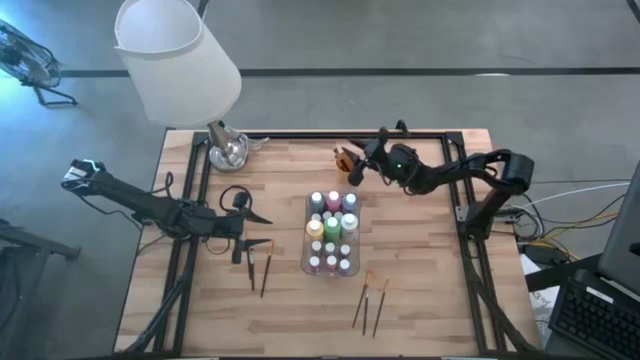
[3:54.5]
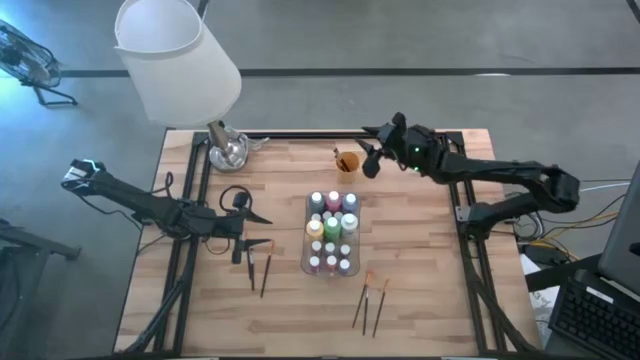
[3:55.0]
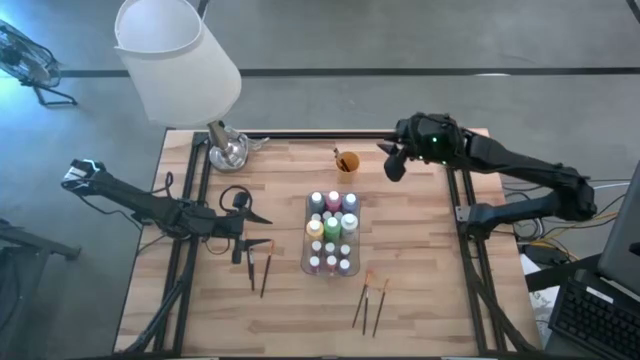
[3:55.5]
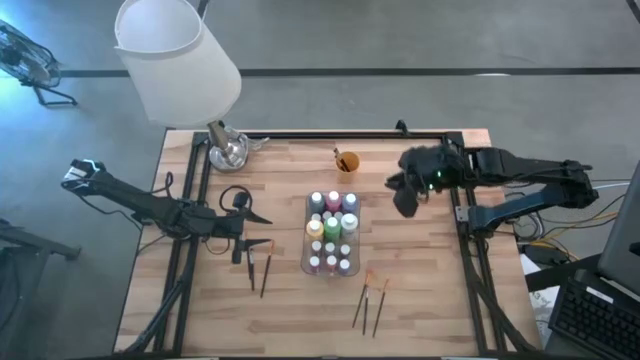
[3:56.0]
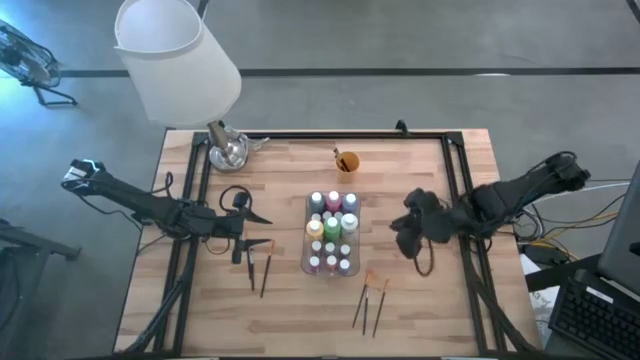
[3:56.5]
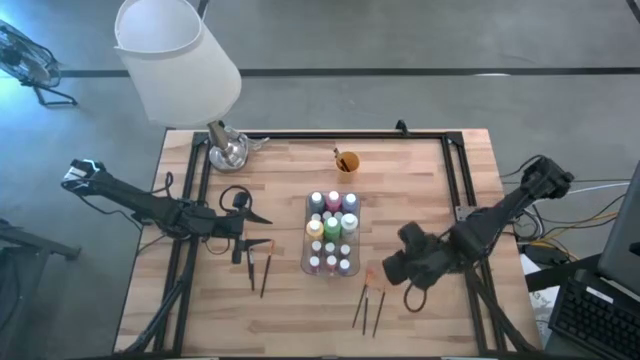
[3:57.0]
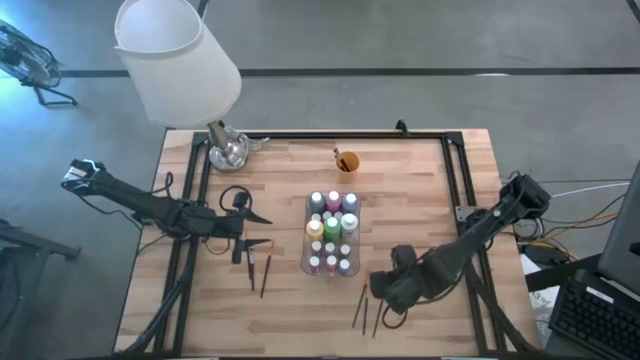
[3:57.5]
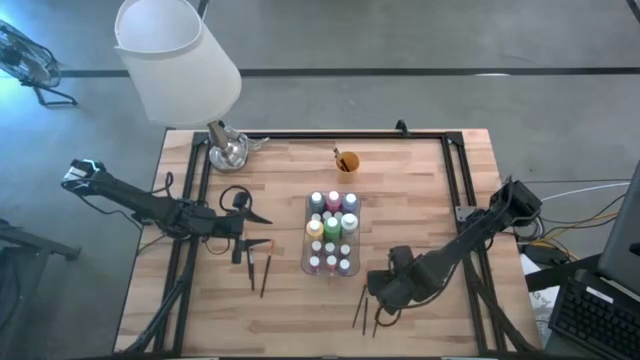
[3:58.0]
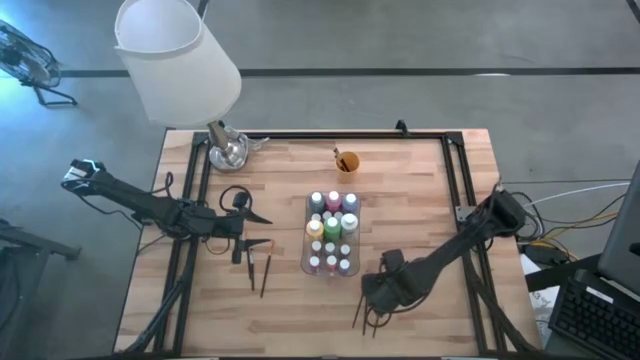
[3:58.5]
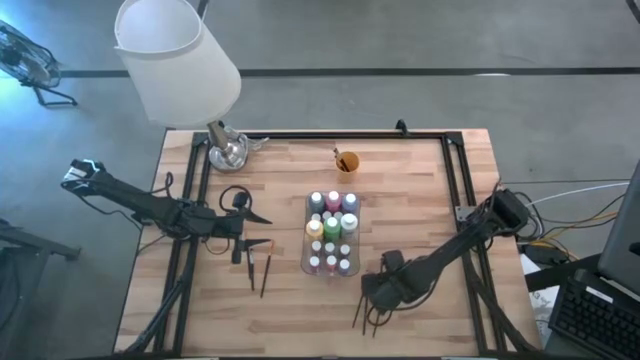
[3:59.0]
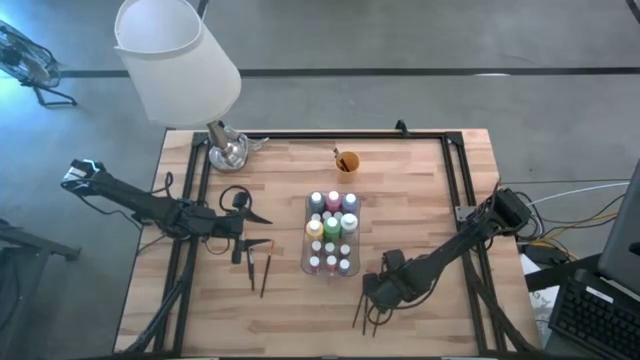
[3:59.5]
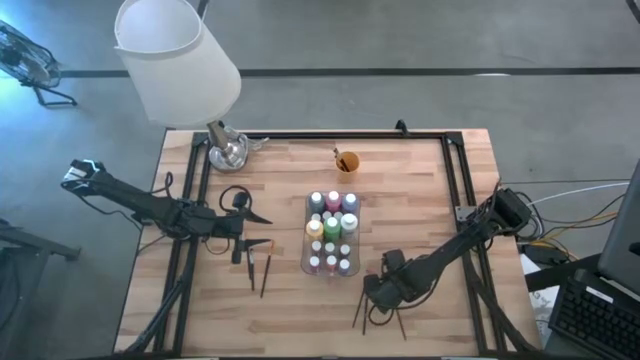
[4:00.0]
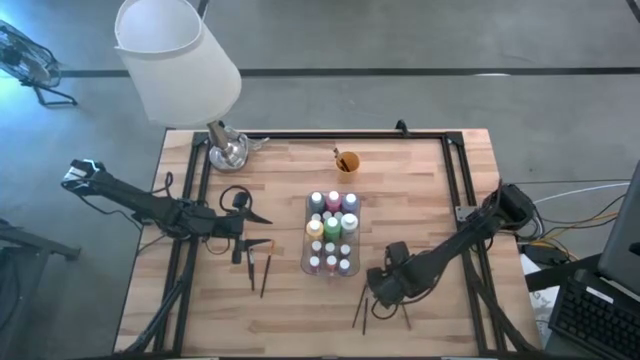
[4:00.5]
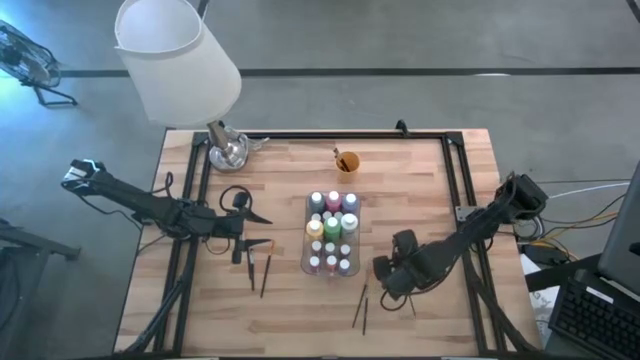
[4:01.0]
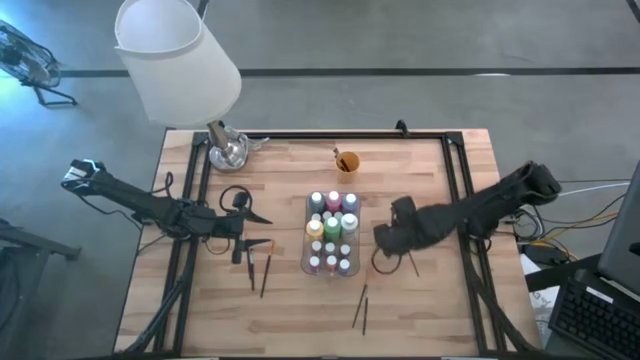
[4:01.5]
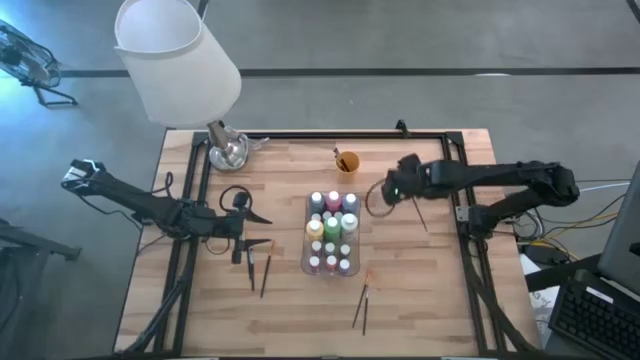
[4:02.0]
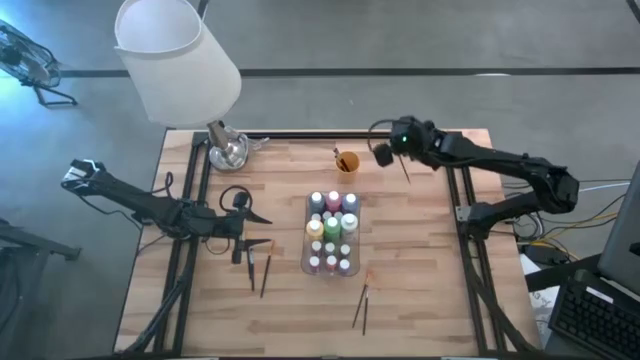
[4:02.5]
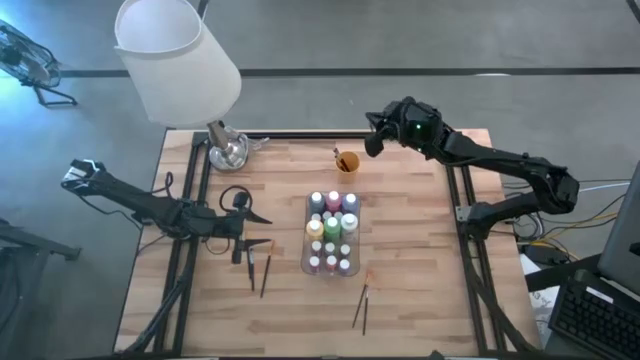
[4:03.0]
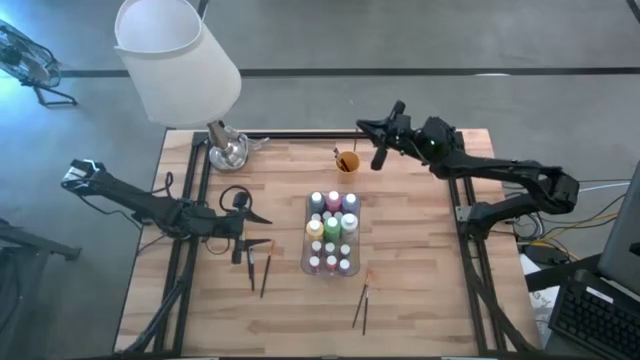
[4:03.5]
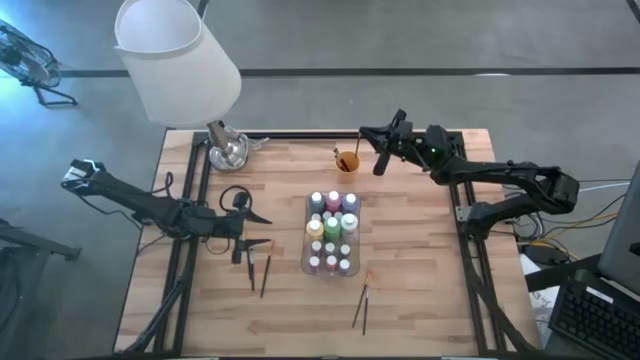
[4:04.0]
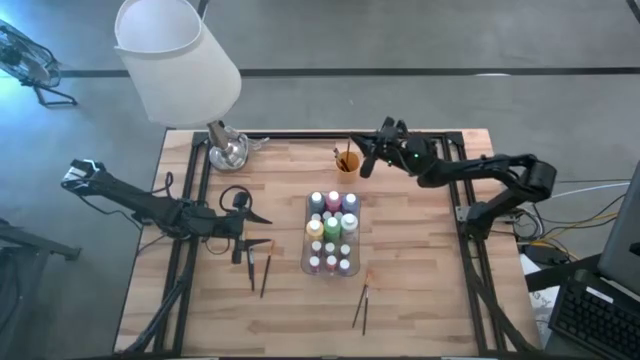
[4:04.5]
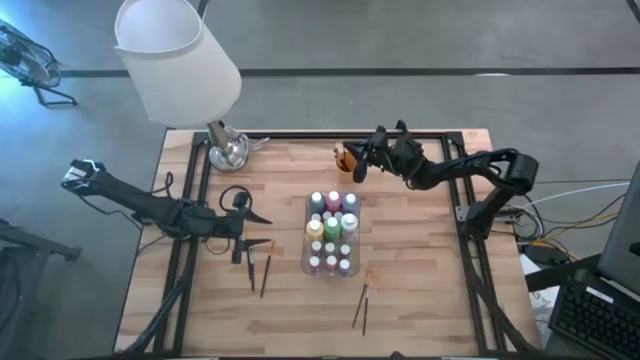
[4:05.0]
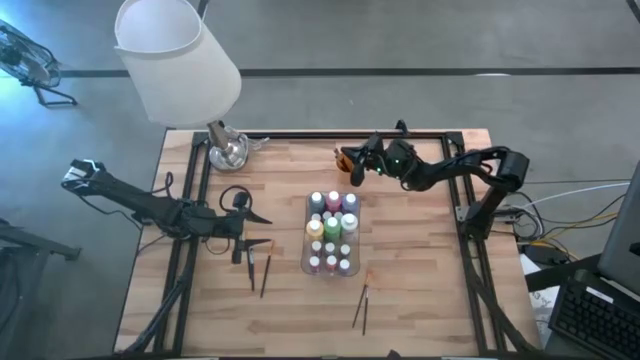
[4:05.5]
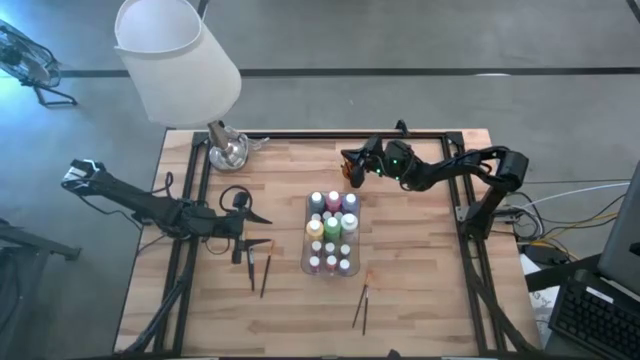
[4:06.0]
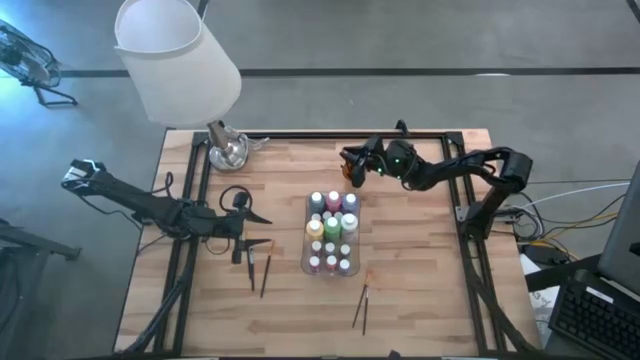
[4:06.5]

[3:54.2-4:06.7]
Task: Pick & Place Paint Supplies
Put the orange paintbrush into the yellow cup

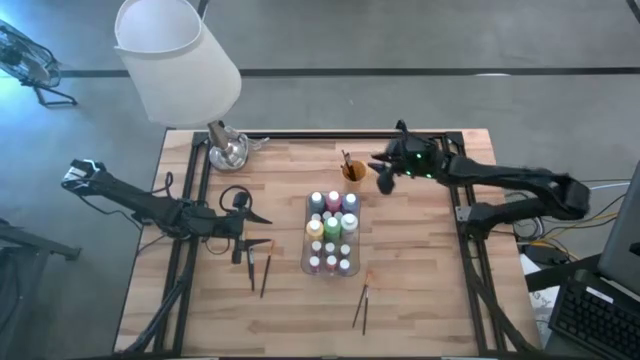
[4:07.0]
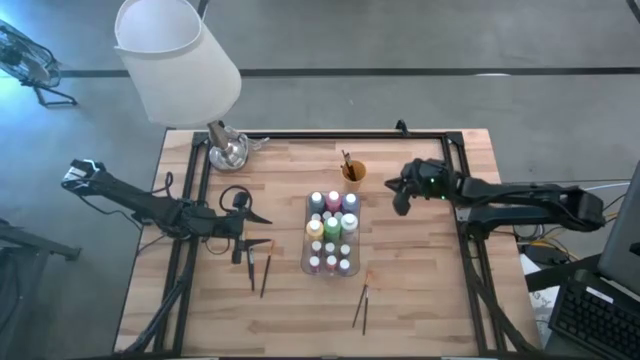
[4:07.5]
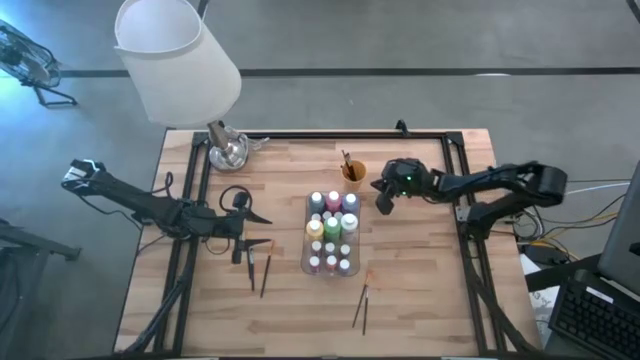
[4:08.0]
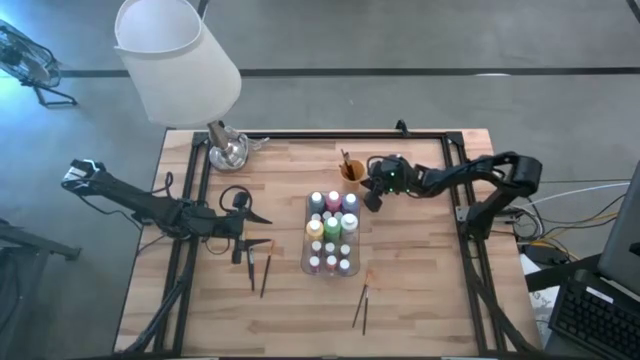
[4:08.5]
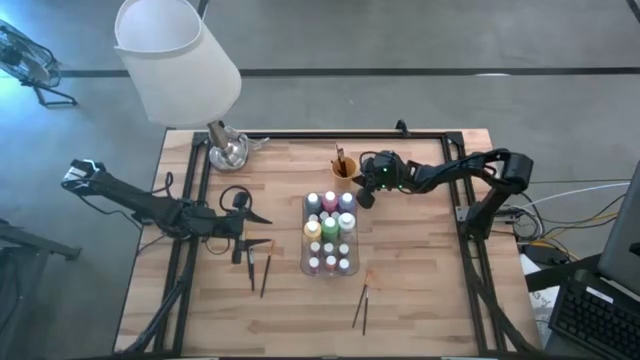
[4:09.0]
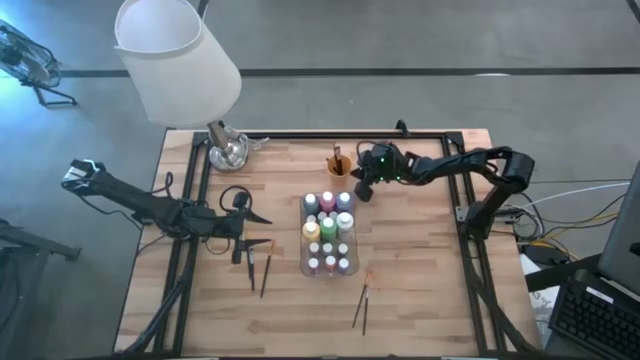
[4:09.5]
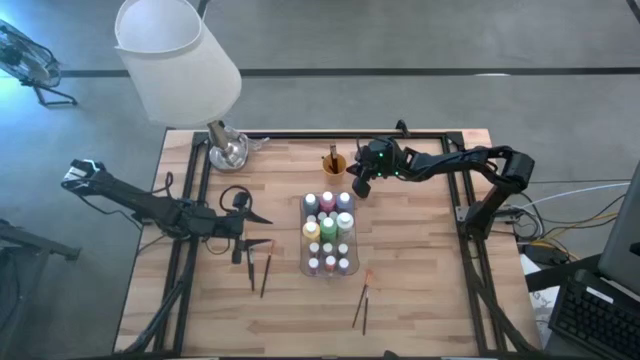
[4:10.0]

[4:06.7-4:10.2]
Adjust the yellow cup

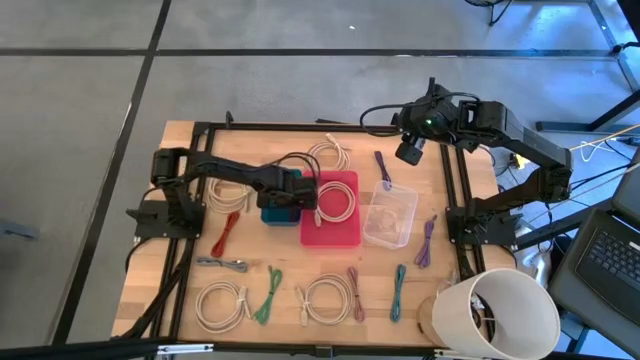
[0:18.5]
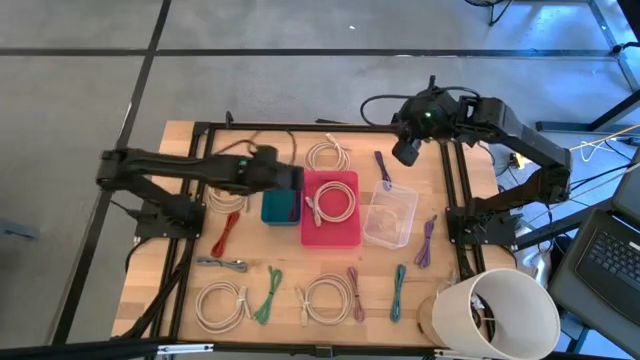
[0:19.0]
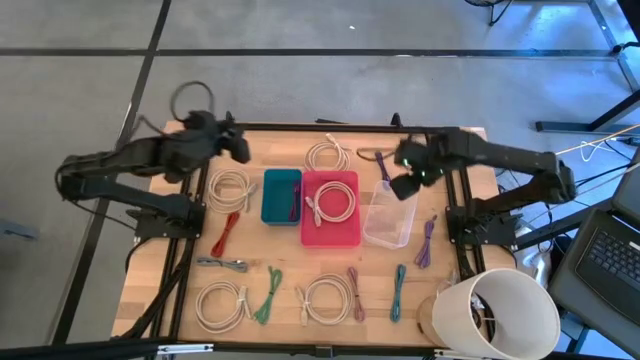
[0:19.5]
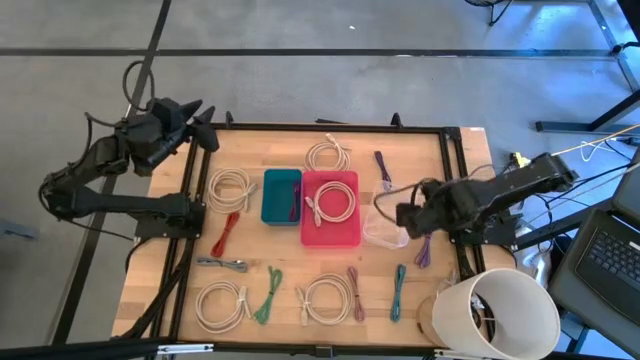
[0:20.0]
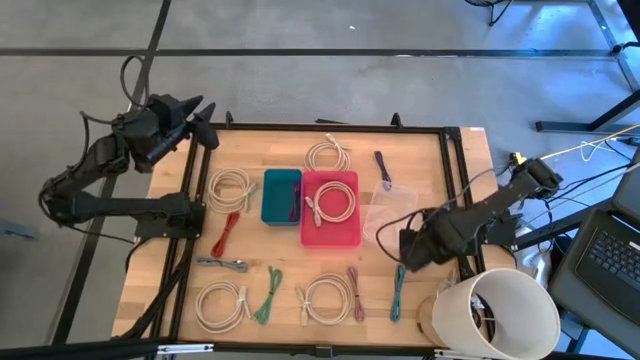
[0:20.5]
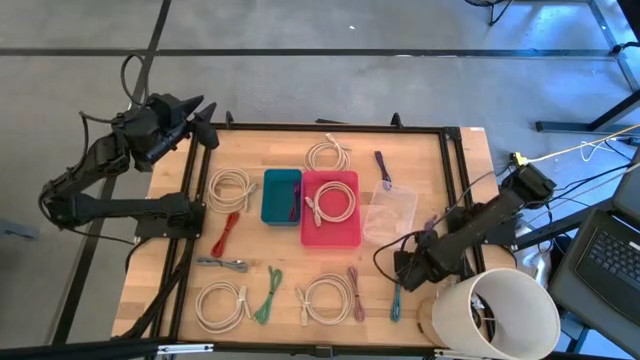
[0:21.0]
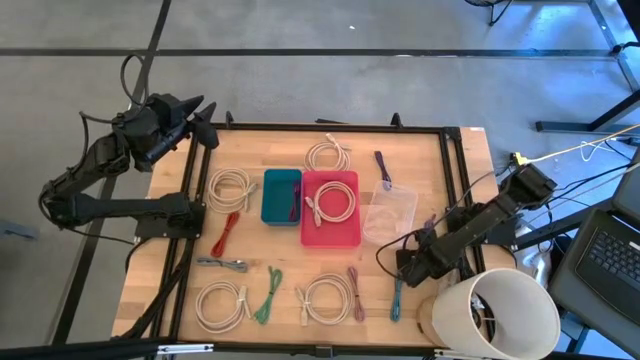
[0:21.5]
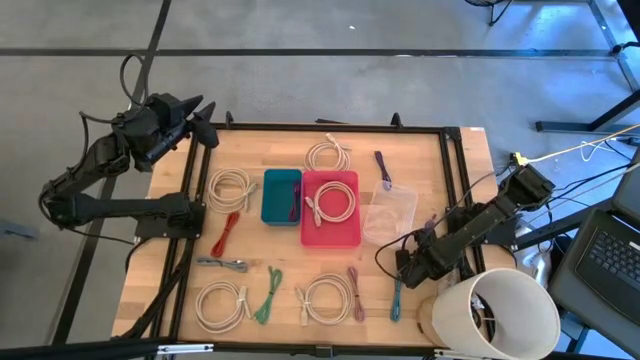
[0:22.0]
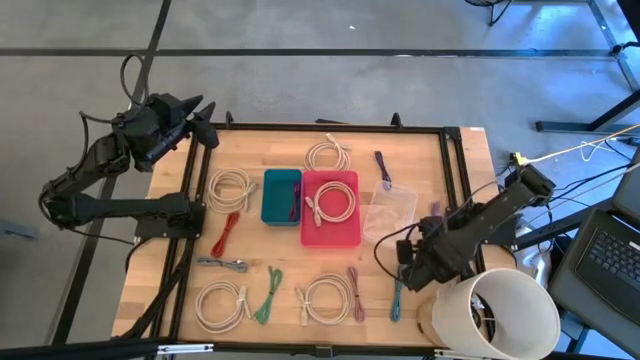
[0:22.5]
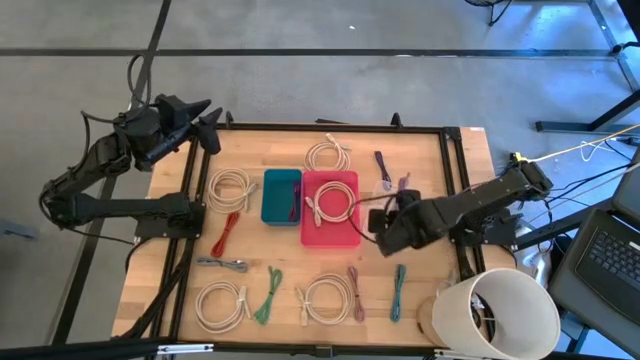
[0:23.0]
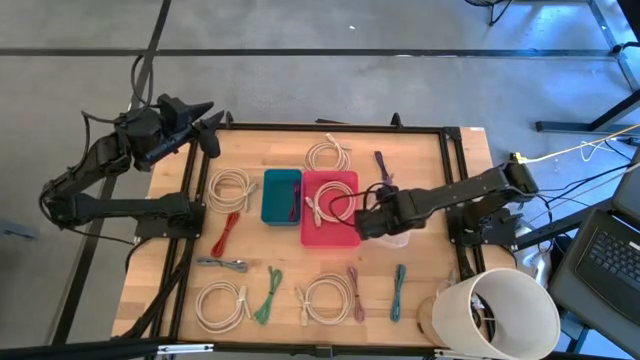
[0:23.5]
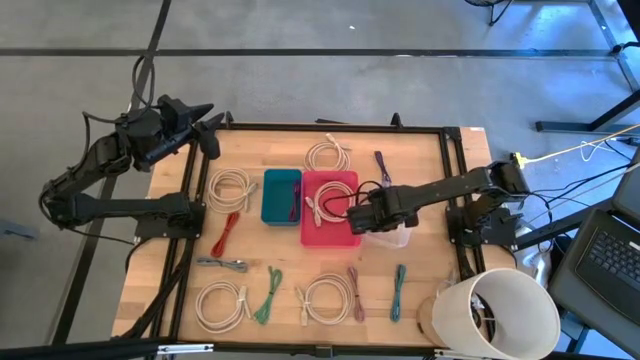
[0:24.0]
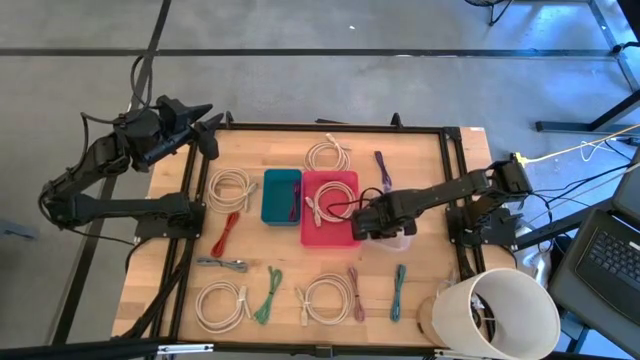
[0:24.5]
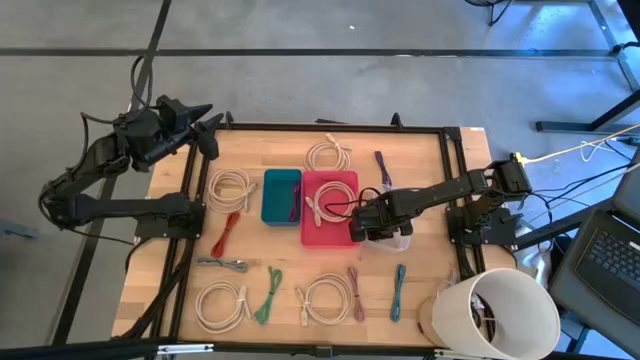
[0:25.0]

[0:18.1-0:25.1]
Task: Pick & Place USB Port
Put the purple charger cable into the transparent bin
